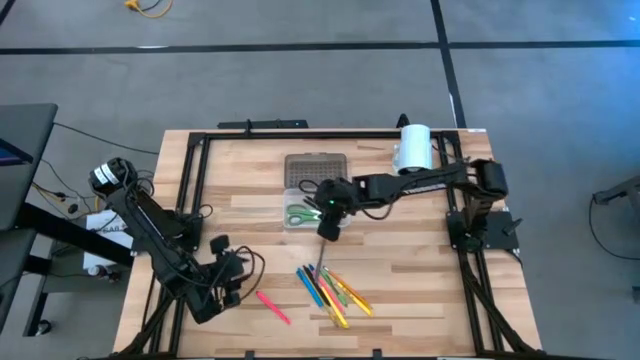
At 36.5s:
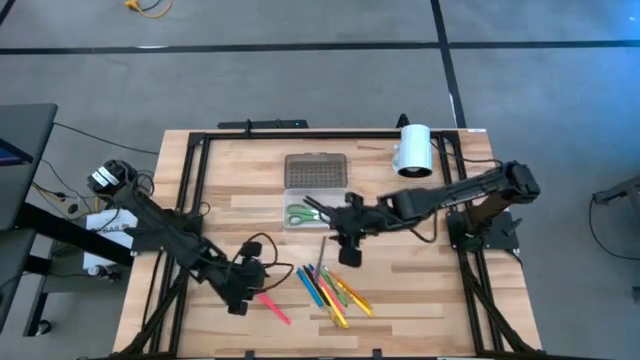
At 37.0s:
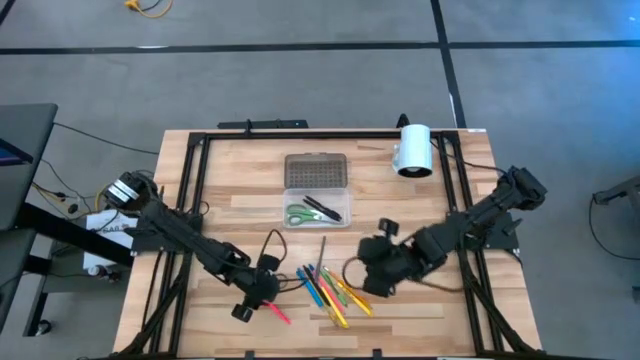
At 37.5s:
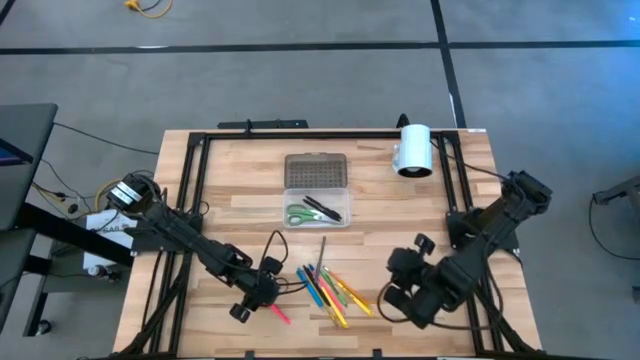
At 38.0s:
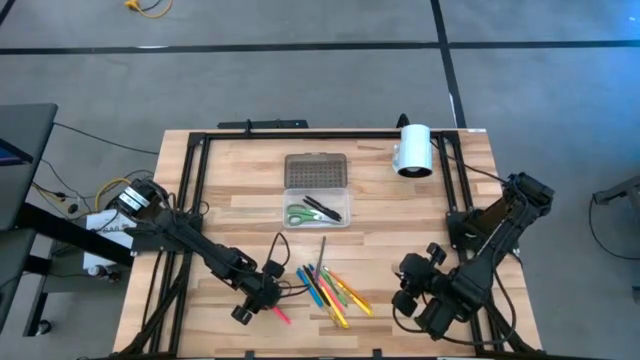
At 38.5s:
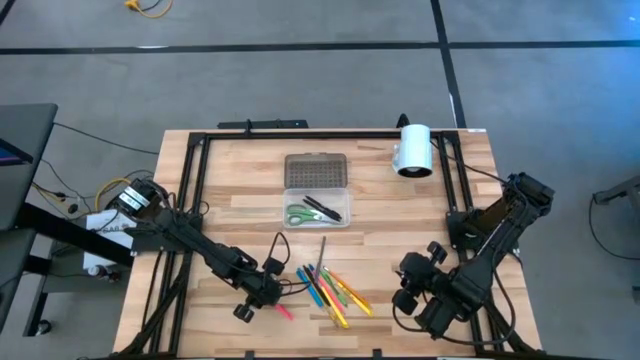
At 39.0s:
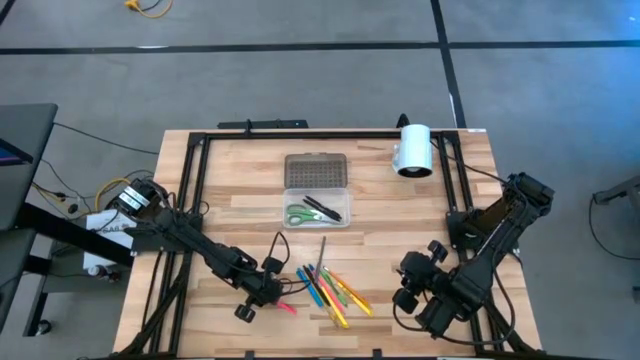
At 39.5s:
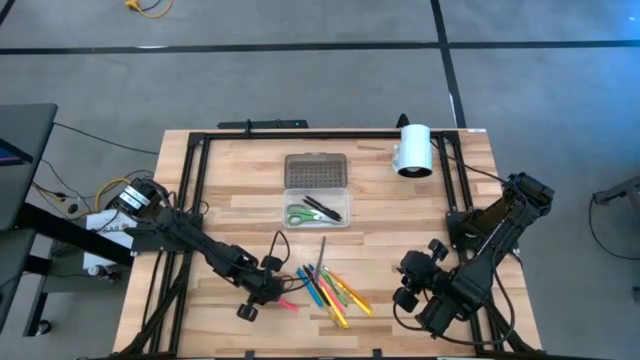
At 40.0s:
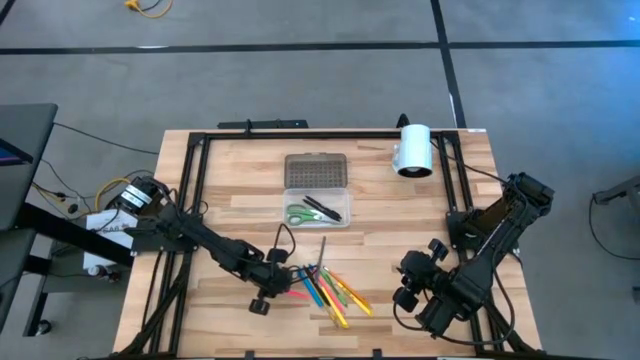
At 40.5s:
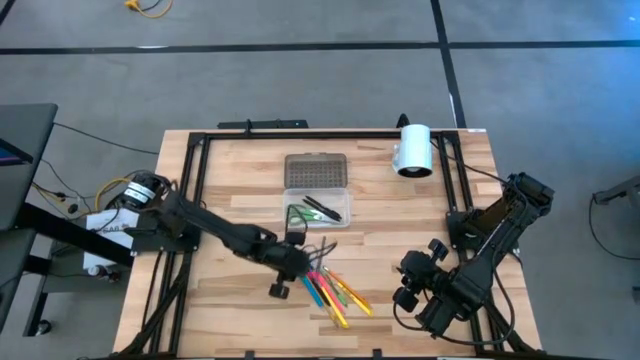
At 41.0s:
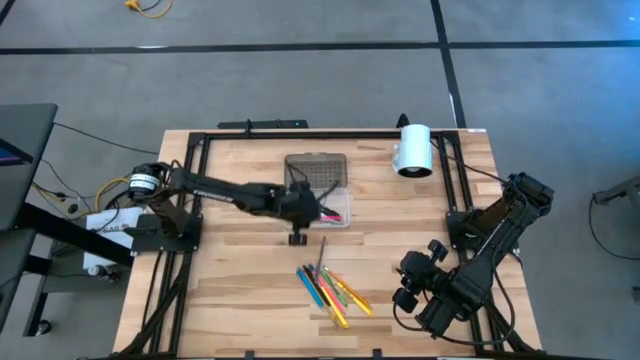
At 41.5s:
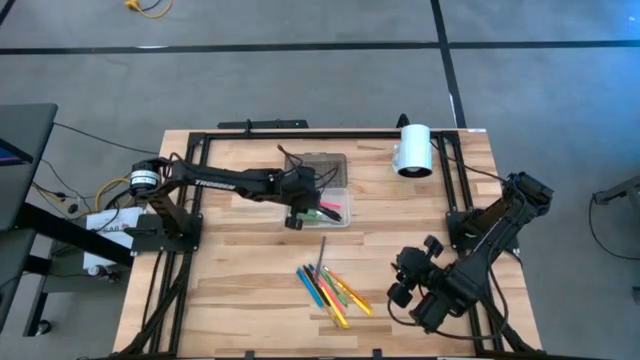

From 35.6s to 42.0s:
Task: Pick & place school supplies into a supply box
Put the pink pen into the supply box

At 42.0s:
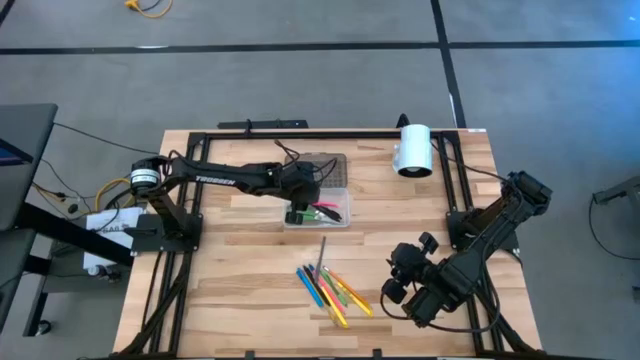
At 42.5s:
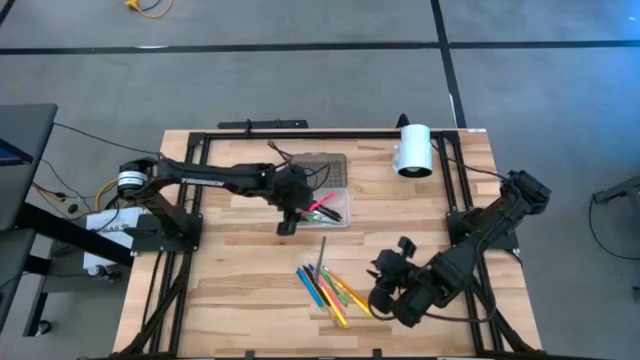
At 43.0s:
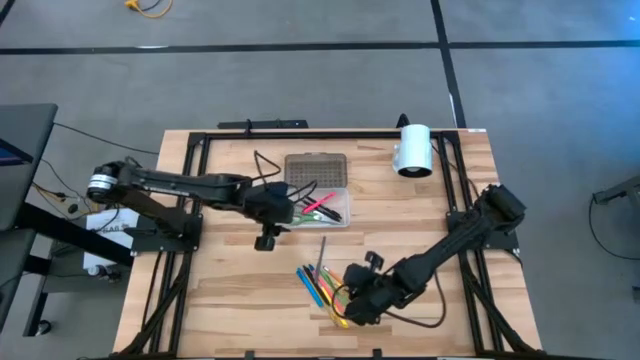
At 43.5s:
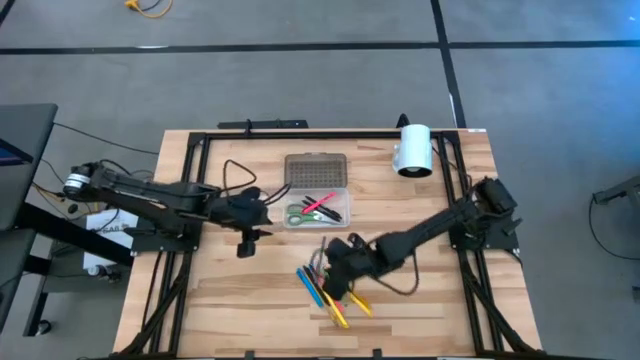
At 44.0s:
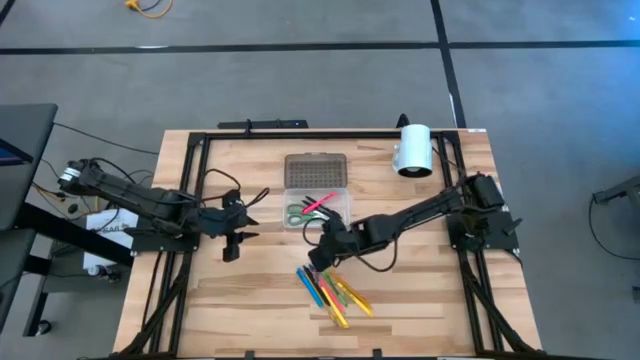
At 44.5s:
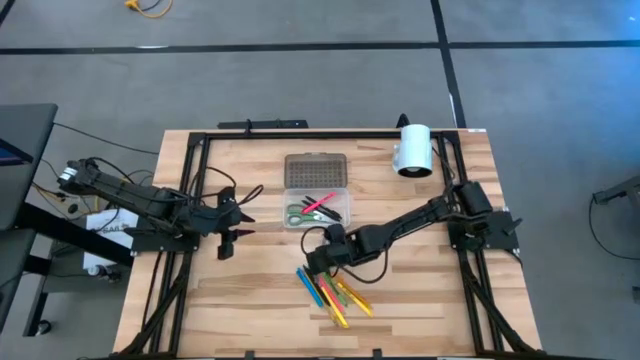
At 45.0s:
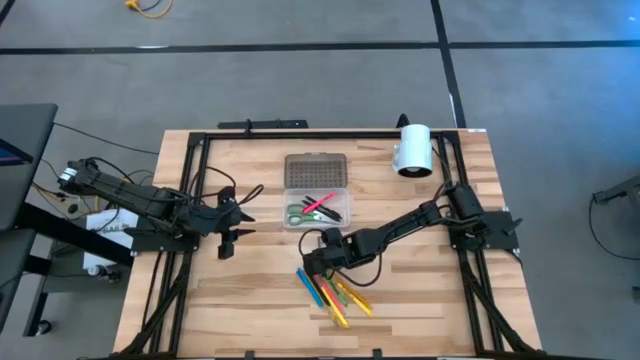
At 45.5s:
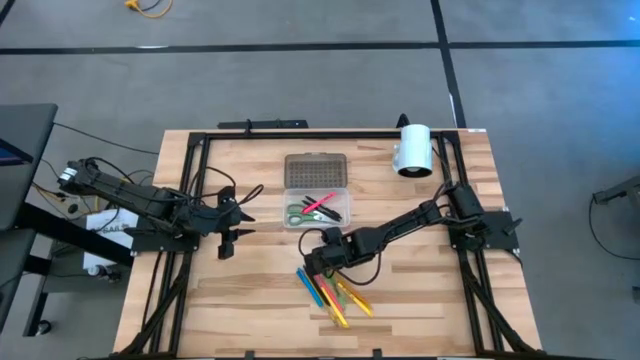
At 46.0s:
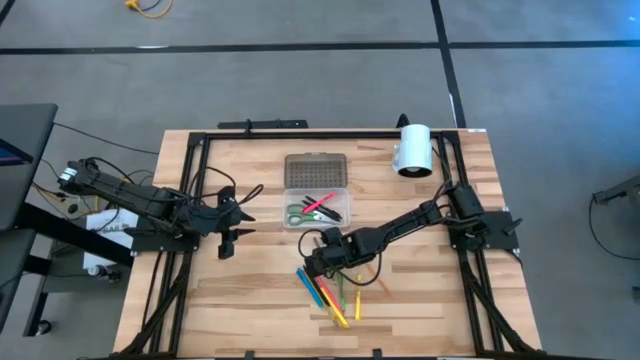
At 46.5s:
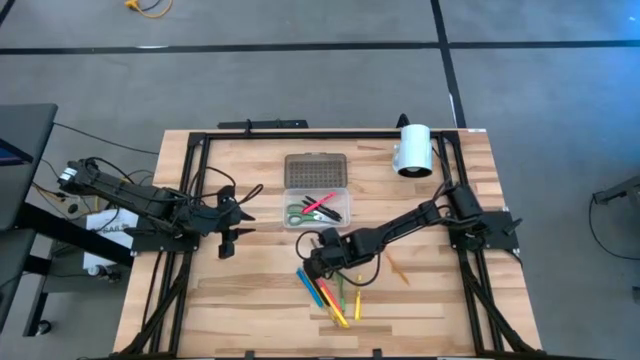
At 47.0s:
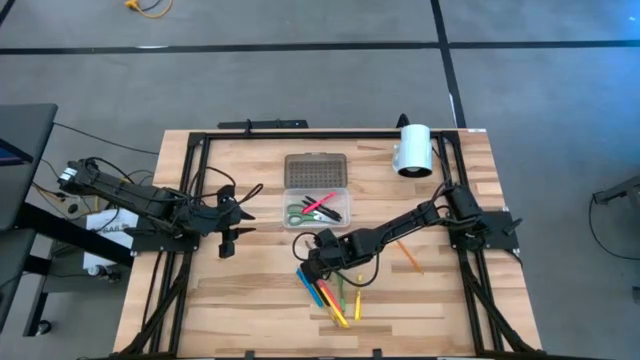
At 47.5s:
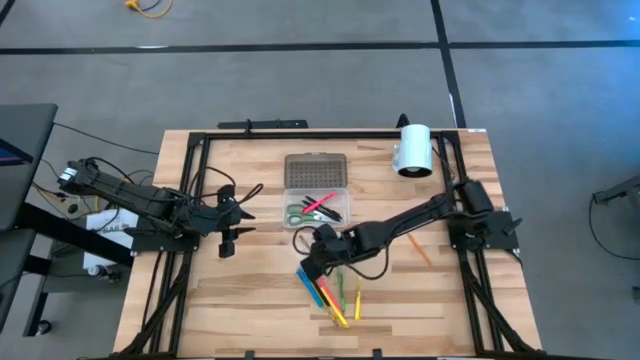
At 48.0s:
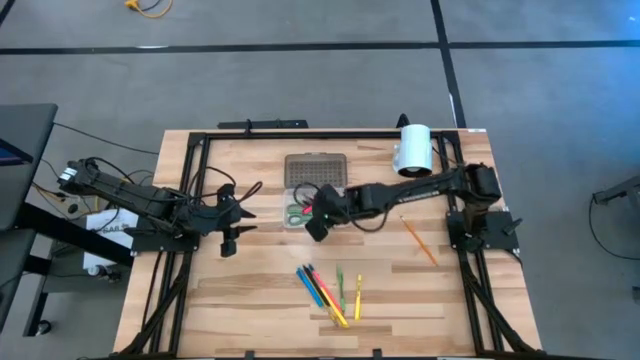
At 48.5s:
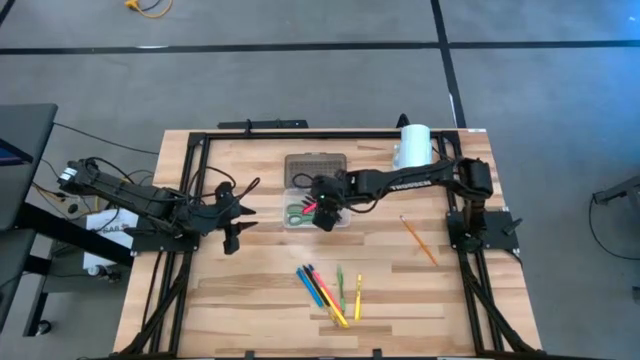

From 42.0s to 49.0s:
Put the gray pen into the supply box

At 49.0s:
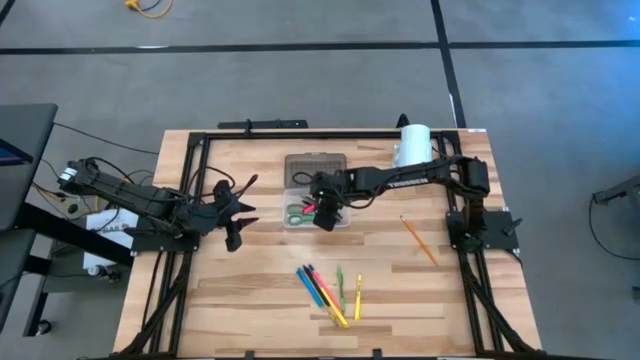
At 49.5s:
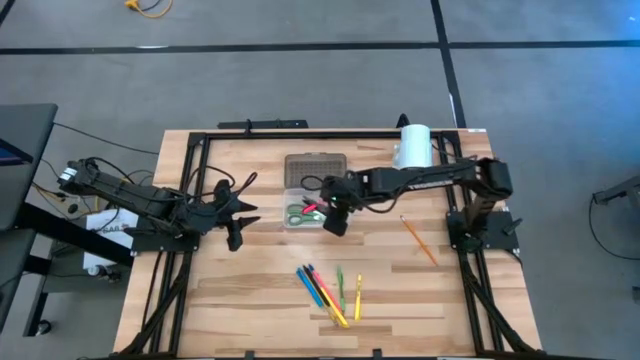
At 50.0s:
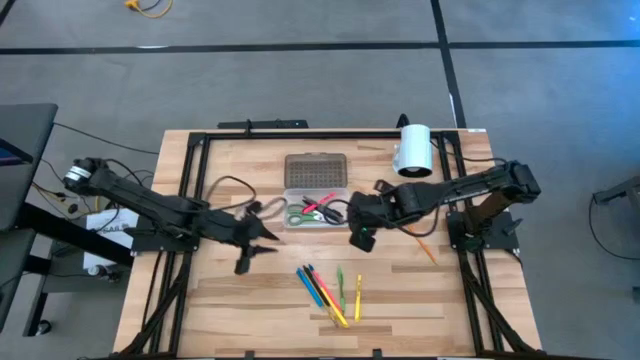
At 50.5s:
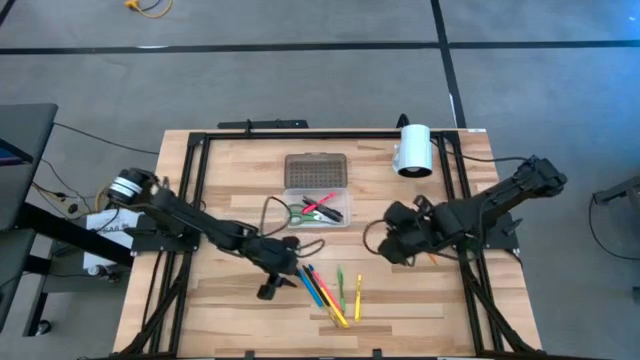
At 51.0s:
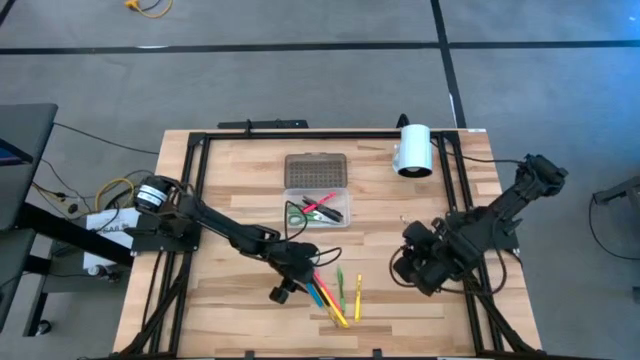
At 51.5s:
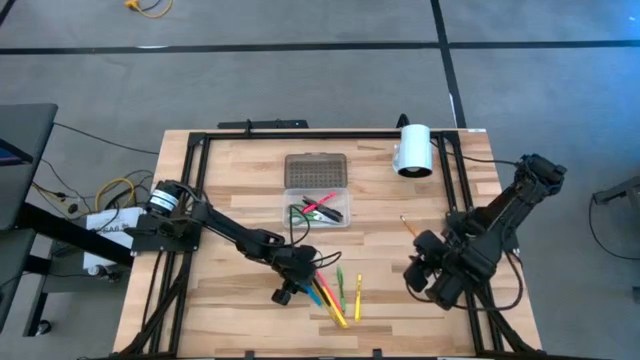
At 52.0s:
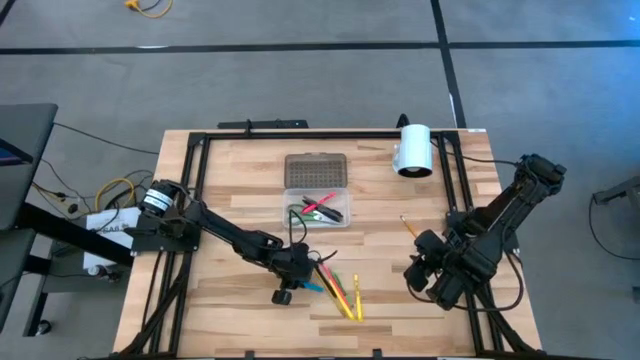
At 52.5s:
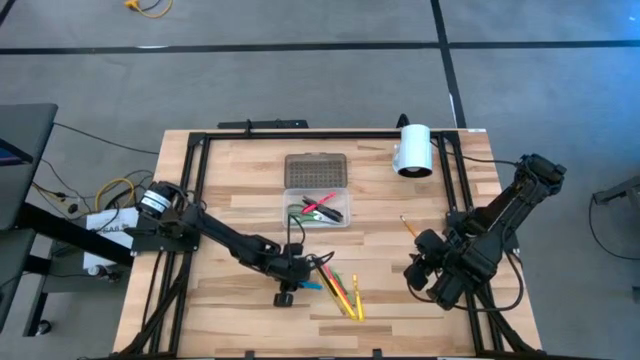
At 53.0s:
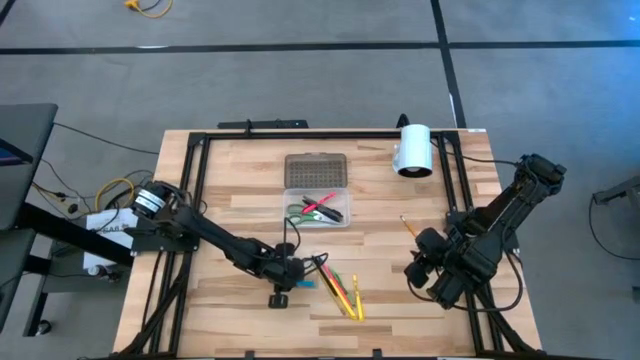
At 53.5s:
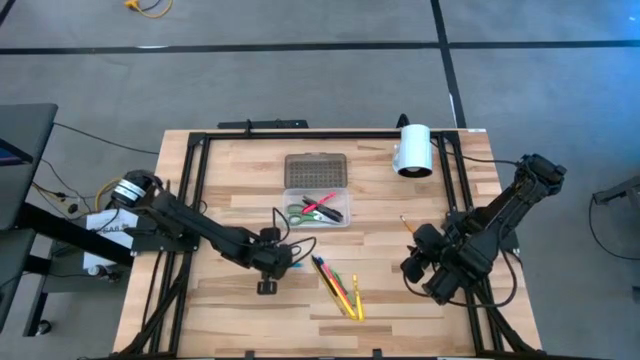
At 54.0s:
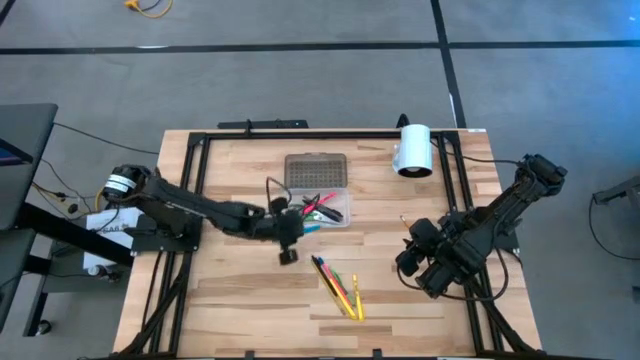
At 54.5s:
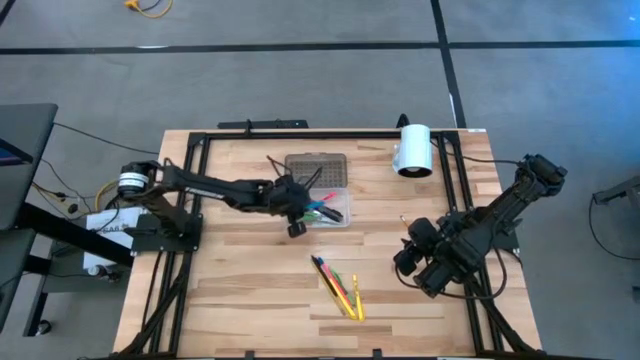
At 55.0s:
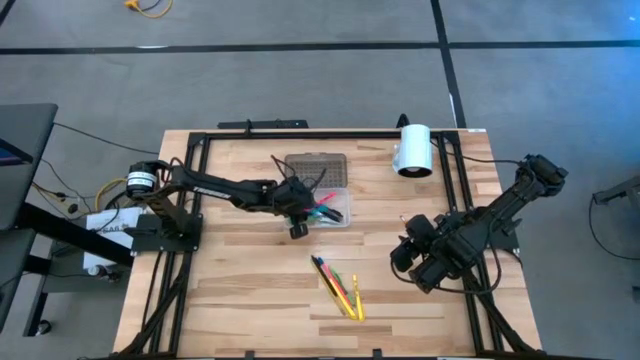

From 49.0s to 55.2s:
Put the blue pen into the supply box

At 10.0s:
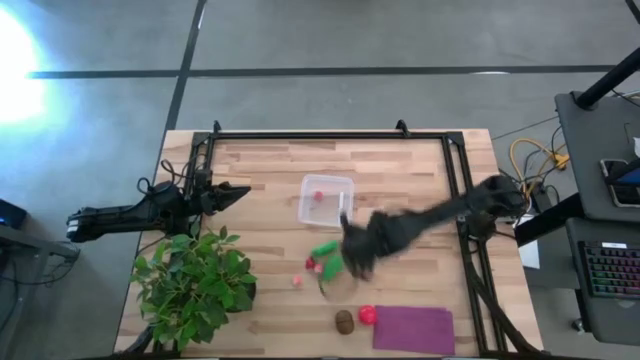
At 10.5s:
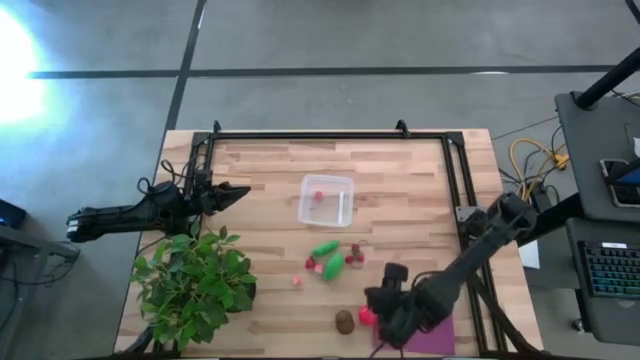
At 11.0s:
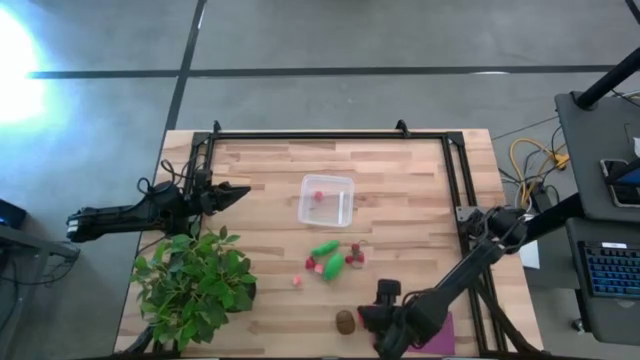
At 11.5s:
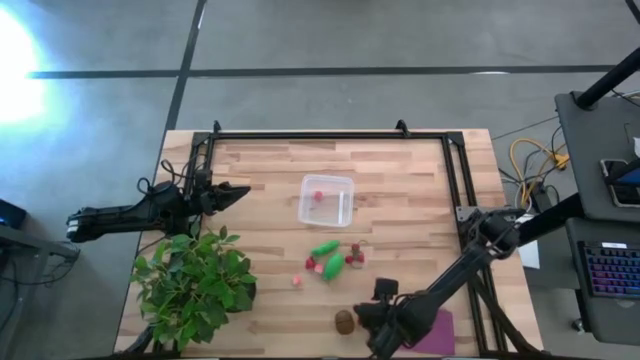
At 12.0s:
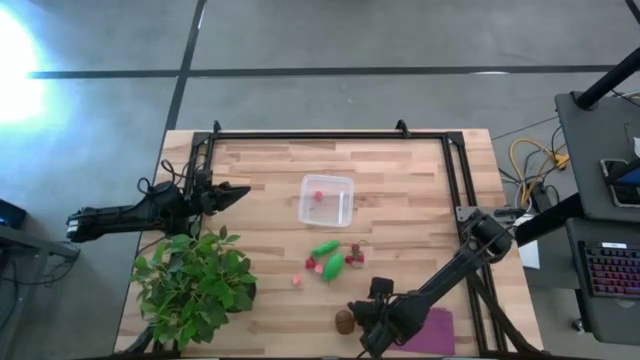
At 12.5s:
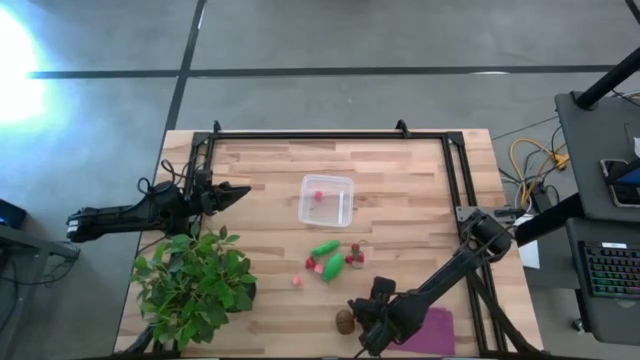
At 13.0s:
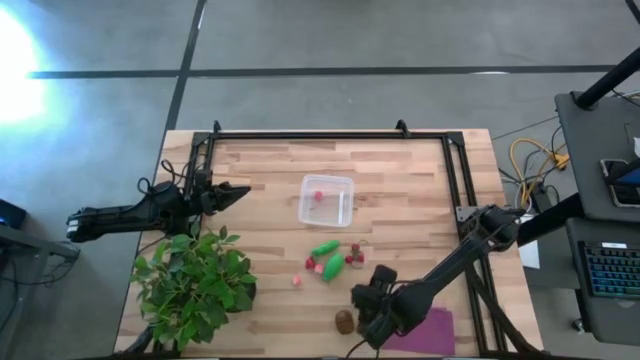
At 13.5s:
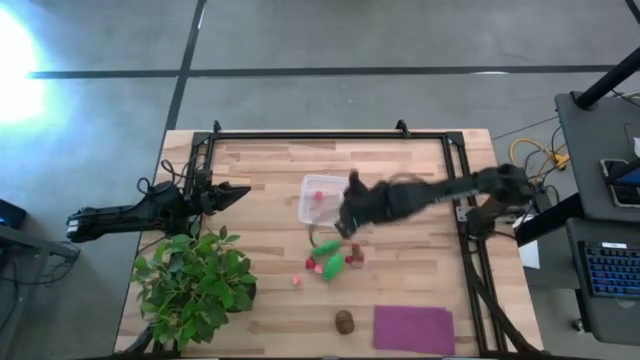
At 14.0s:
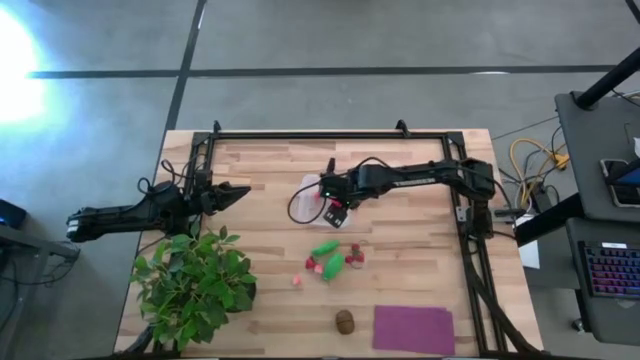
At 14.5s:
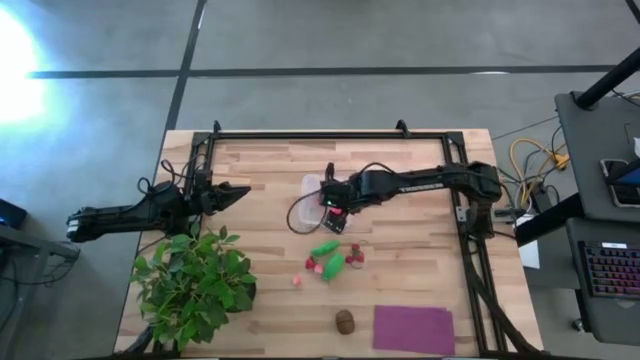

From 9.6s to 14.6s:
Task: Pick and placing Produce into tupperware
Put the tomato into the transparent bin
